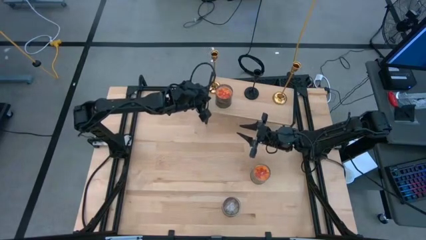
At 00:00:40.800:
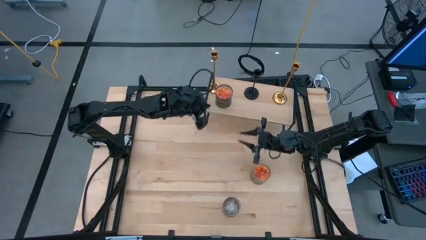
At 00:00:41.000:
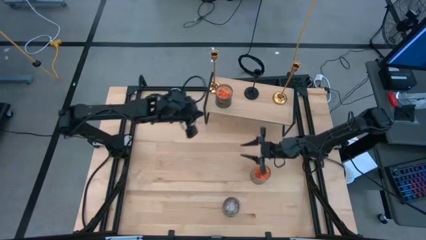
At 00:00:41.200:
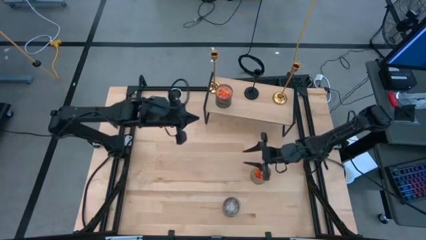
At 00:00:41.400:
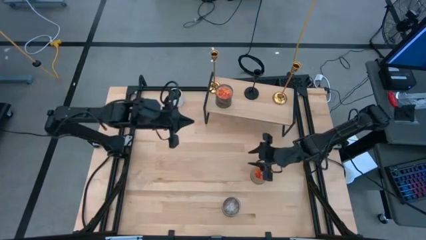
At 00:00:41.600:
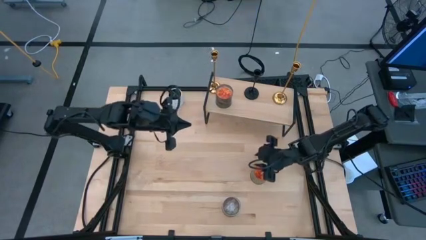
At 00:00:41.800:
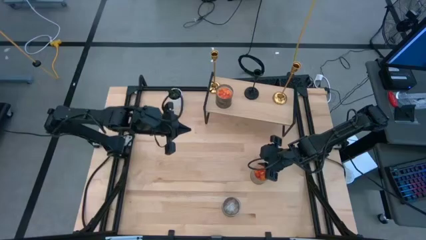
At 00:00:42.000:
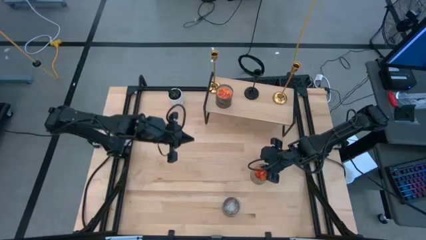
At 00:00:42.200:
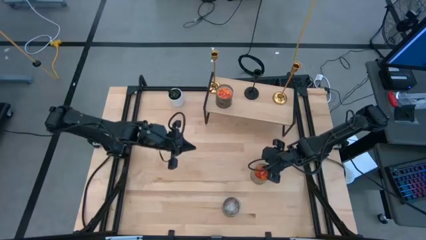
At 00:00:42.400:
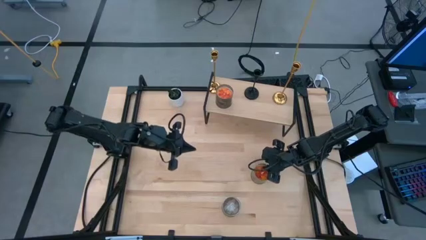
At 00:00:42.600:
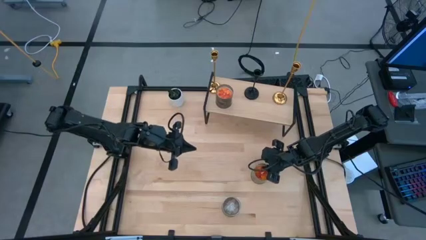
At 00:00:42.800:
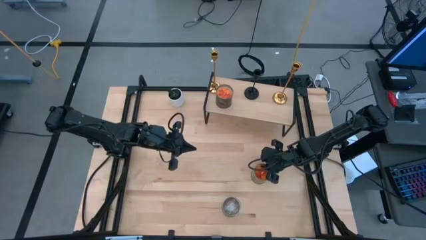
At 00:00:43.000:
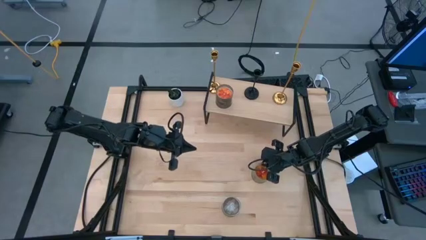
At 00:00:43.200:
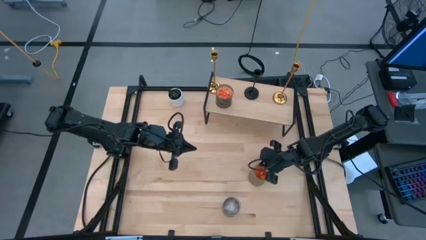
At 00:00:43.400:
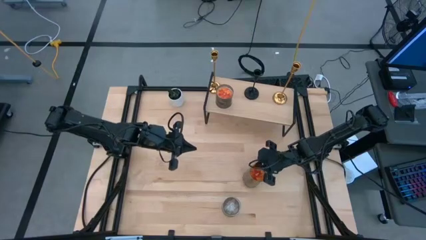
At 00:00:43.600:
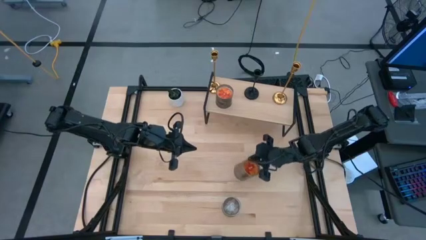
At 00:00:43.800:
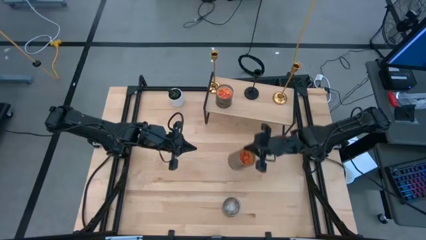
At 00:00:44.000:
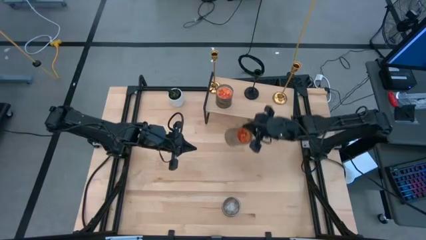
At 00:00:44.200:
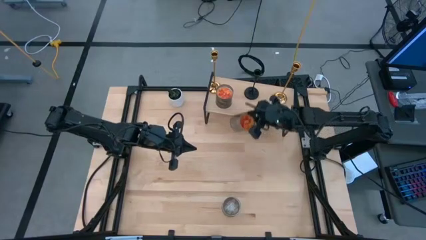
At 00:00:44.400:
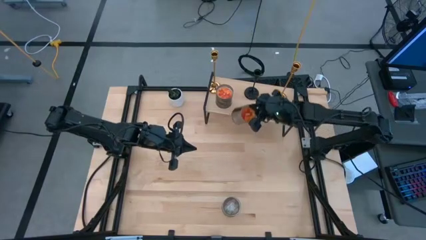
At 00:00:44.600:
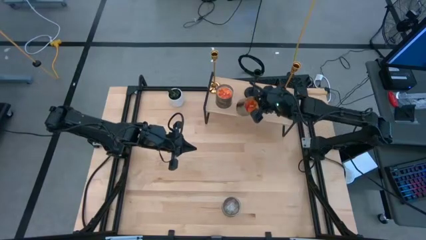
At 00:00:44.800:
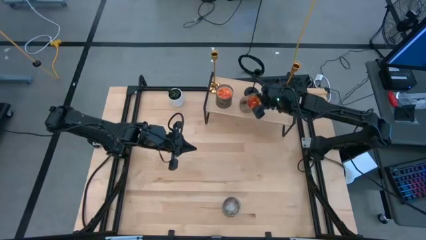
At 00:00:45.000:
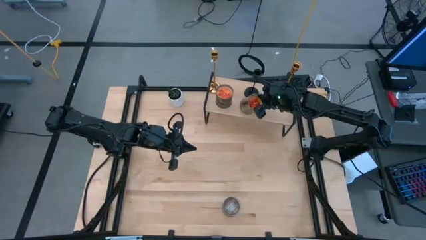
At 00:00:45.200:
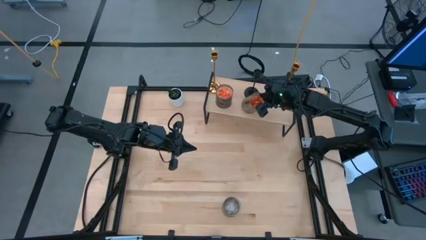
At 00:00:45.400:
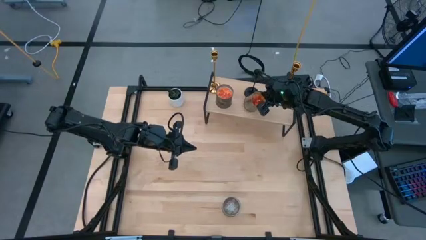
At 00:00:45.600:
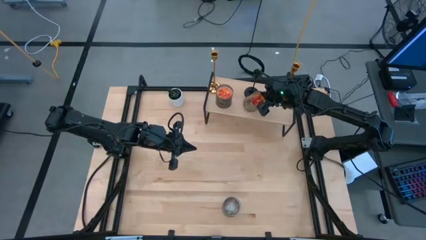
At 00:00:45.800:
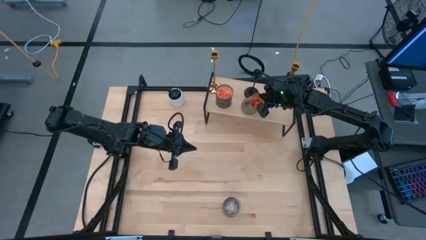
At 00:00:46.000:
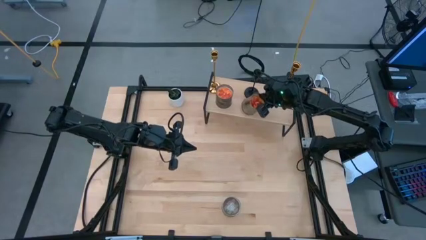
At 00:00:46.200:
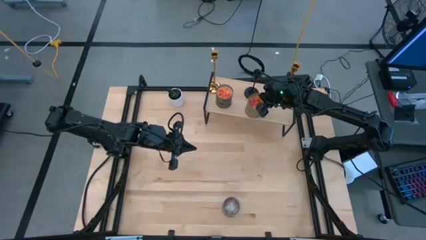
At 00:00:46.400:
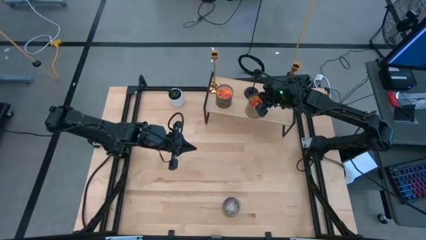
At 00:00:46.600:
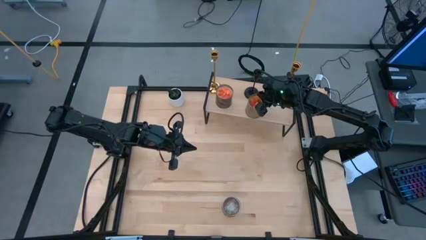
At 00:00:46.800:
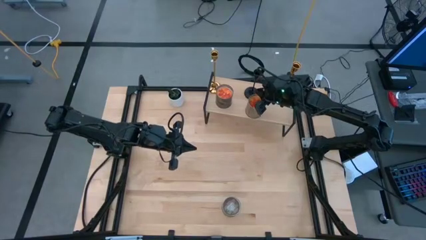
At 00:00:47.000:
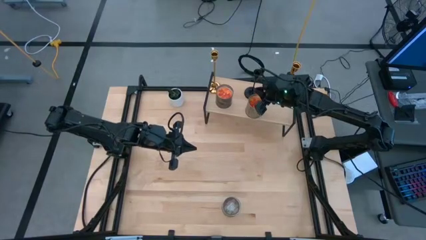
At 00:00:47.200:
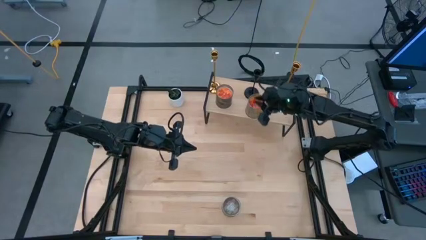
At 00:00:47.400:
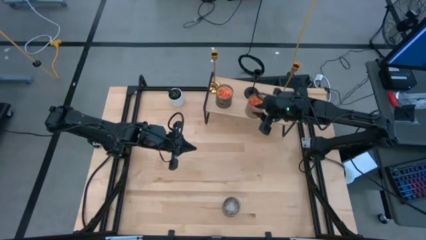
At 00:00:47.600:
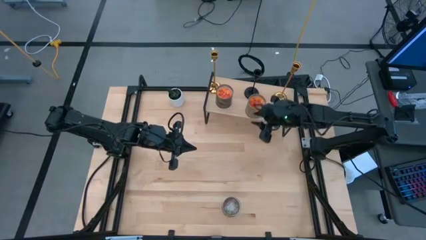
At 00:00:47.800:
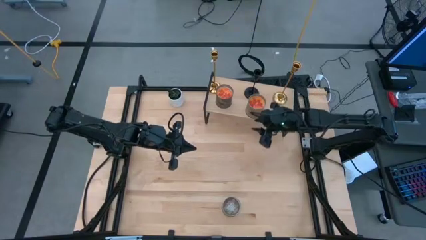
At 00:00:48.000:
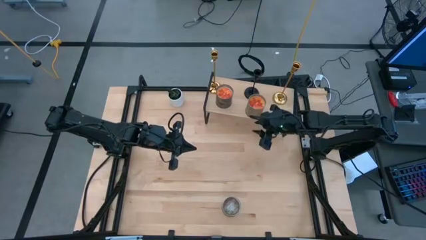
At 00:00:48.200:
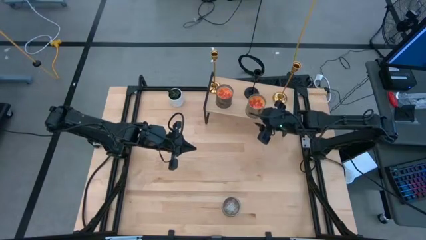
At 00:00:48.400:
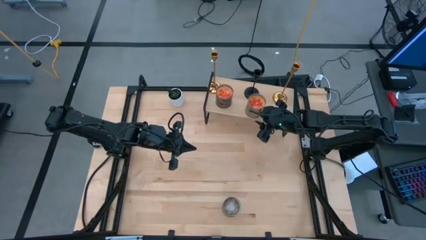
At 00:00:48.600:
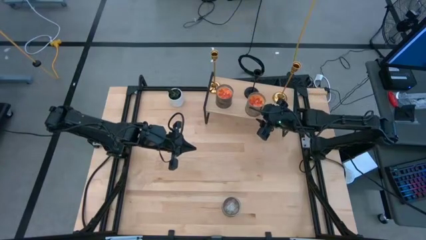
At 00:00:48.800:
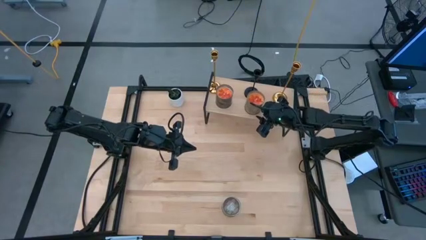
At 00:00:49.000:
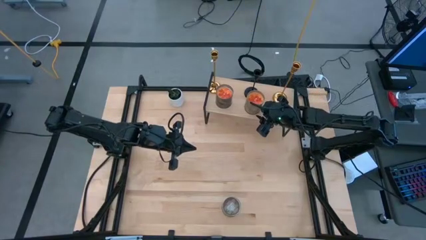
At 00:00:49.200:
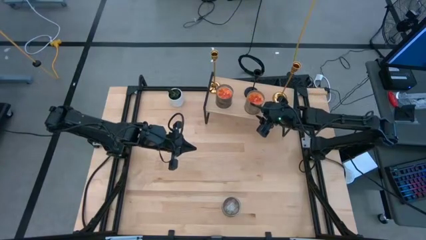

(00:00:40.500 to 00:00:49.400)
Task: Pick & Place candle stick holders
Put the orange scented candle on the shelf aligned with the black candle holder

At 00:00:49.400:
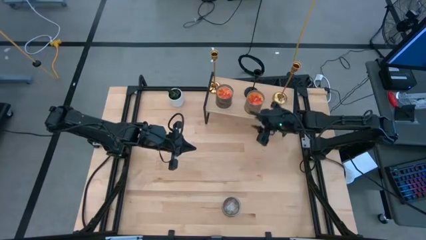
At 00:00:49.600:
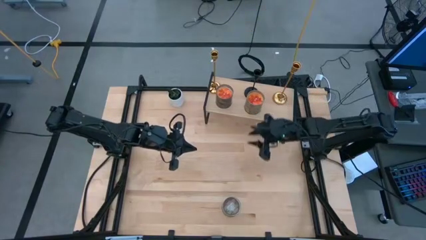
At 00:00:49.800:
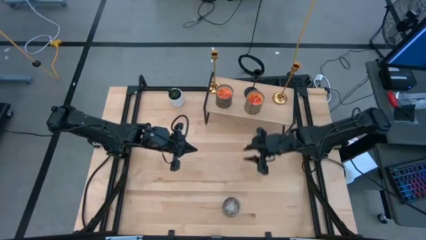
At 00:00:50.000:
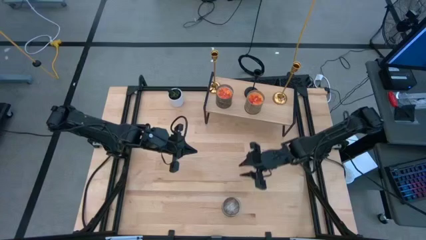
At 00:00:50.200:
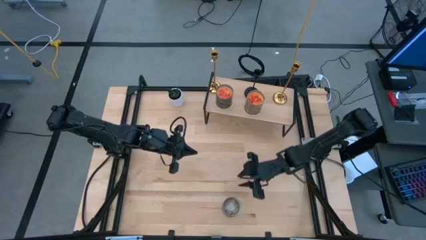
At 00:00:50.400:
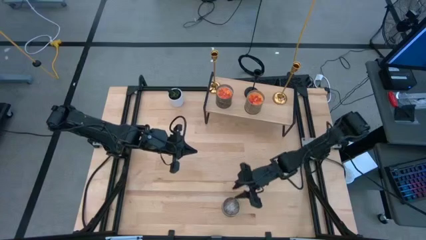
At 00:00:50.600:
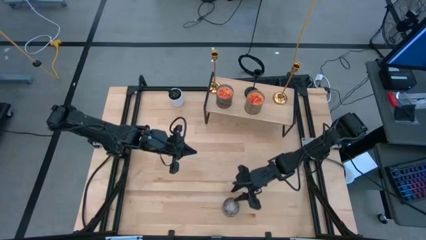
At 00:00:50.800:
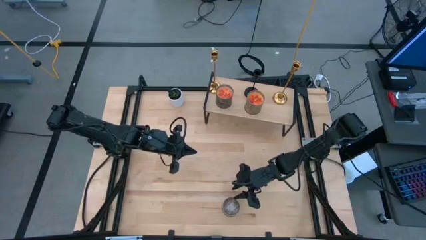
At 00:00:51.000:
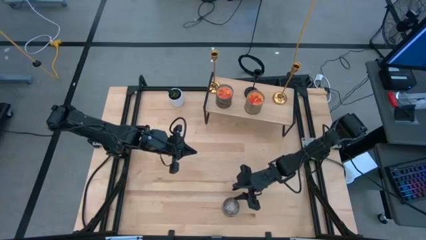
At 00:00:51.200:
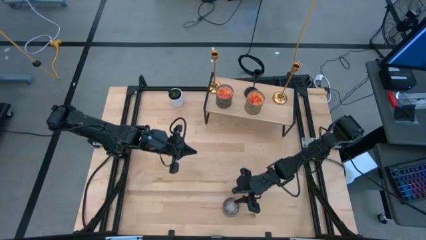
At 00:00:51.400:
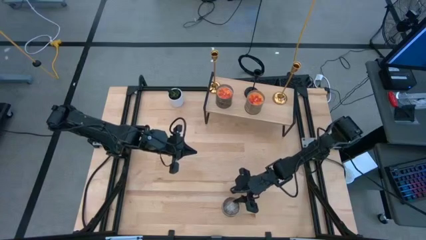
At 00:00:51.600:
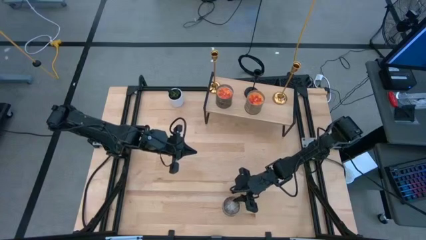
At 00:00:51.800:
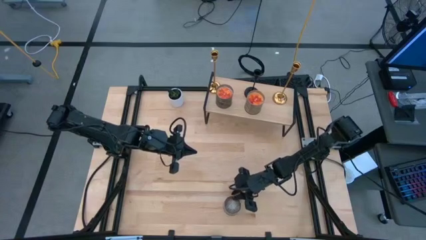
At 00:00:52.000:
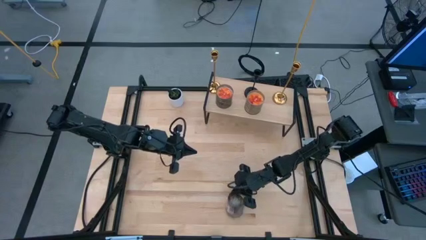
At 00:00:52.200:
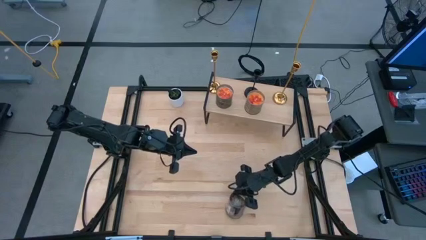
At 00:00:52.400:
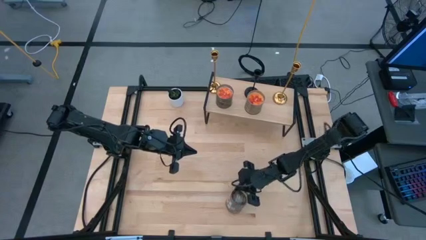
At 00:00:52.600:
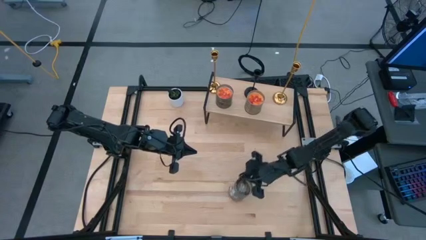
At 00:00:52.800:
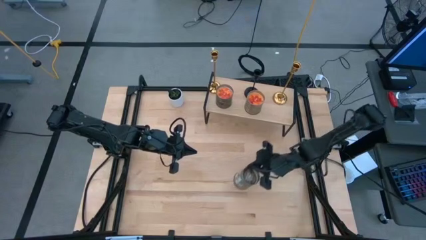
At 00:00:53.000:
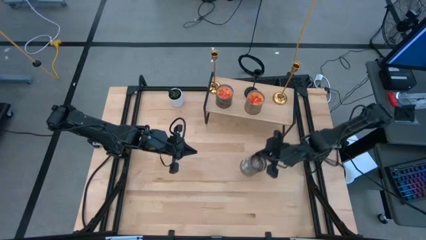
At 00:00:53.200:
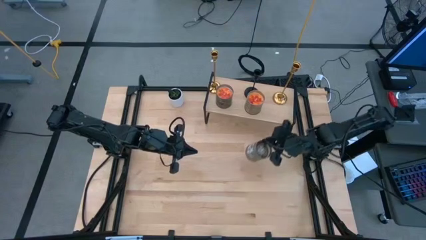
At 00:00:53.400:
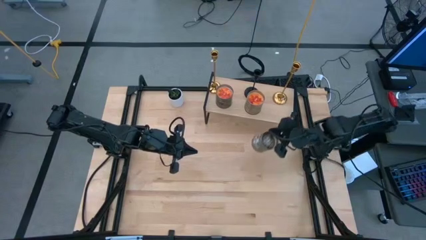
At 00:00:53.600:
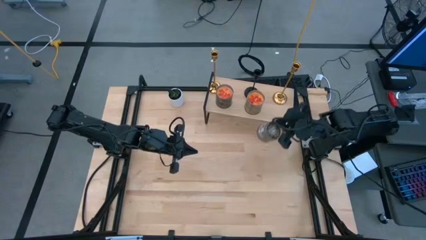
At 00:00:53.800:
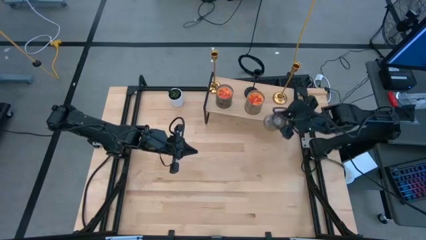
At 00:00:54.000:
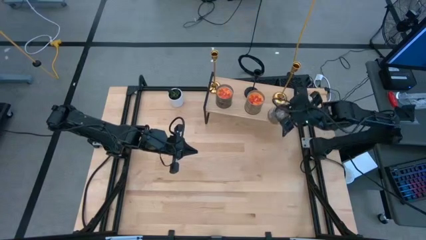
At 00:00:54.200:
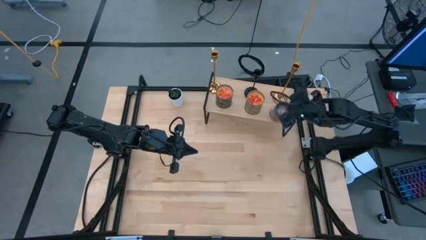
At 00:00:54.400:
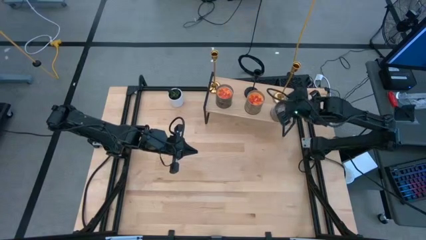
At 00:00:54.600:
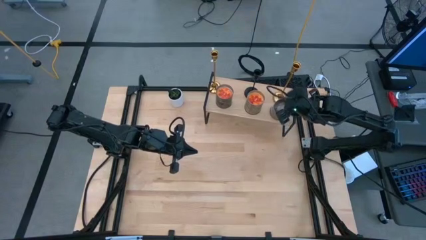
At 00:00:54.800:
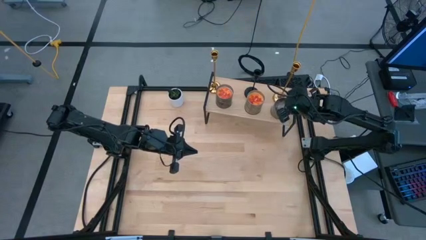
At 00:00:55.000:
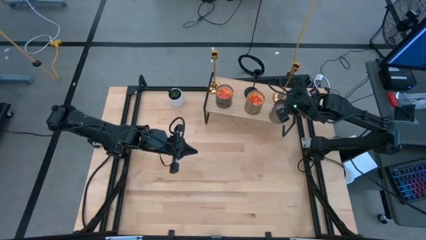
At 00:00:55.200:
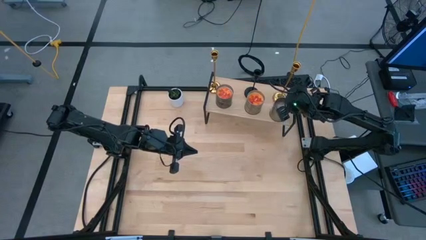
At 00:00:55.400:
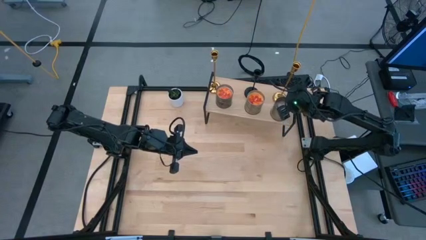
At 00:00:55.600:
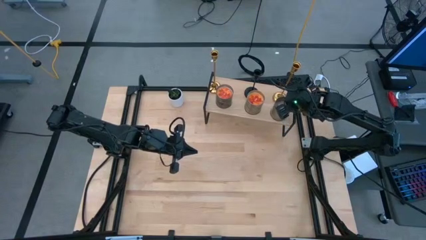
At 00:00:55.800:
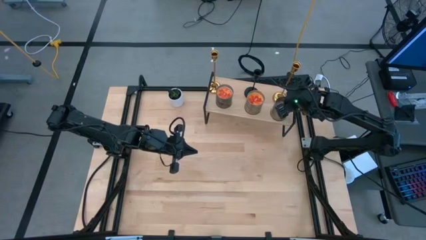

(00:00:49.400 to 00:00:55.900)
Put the brown scented candle on the shelf aligned with the right golden candle holder

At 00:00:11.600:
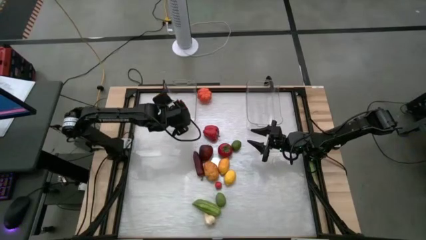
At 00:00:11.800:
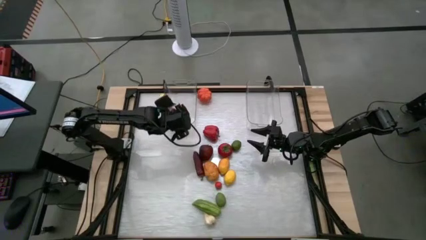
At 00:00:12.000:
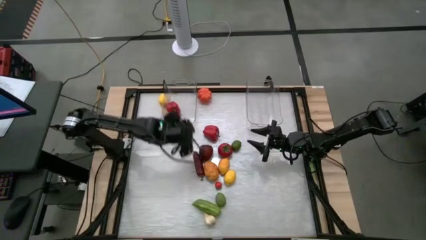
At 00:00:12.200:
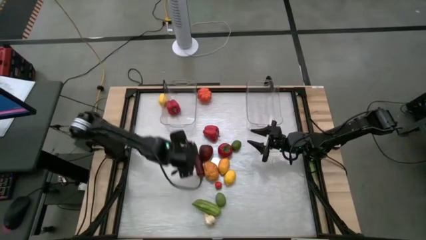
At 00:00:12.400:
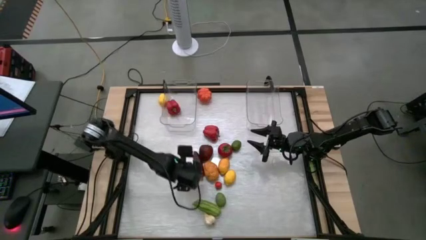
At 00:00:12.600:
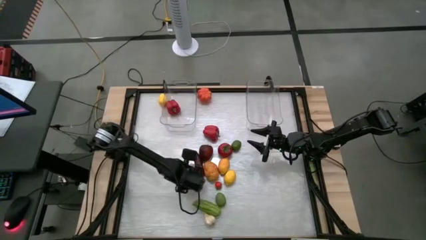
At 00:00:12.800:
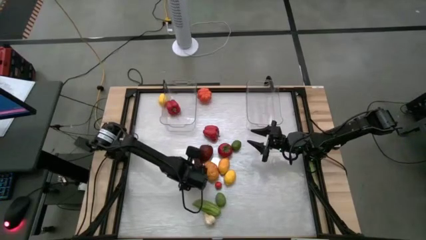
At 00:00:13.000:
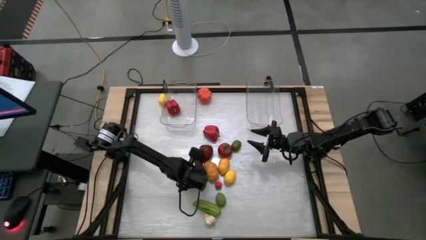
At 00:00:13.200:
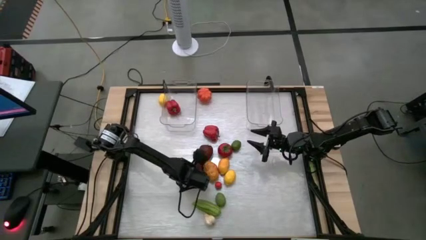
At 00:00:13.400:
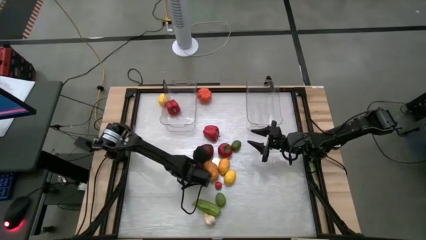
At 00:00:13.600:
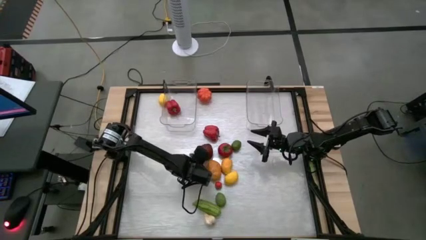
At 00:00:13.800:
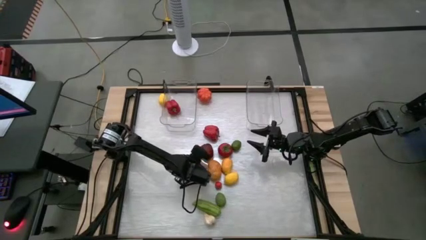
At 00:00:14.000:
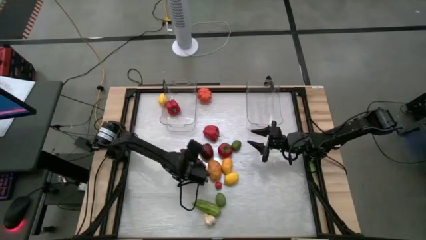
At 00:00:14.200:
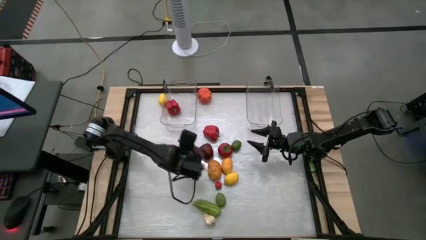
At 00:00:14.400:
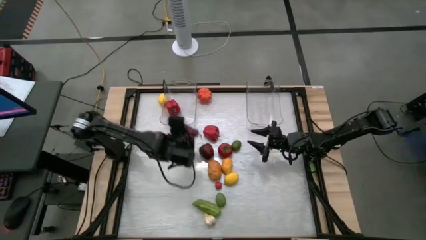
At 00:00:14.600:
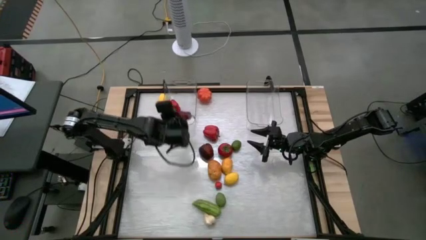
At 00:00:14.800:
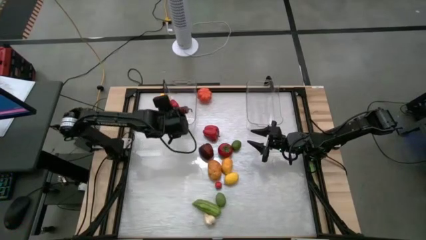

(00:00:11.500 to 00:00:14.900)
Task: Sort produce into baskets
Put the dark red chili pepper into the left transparent tin
